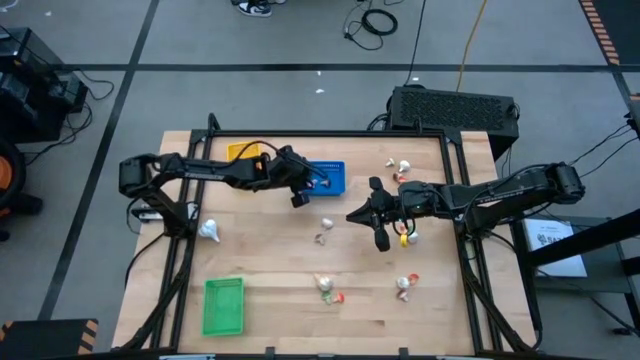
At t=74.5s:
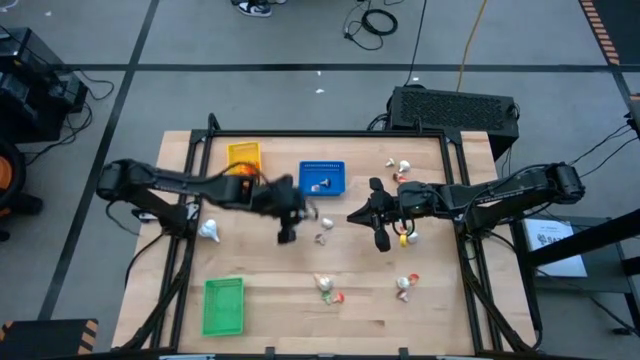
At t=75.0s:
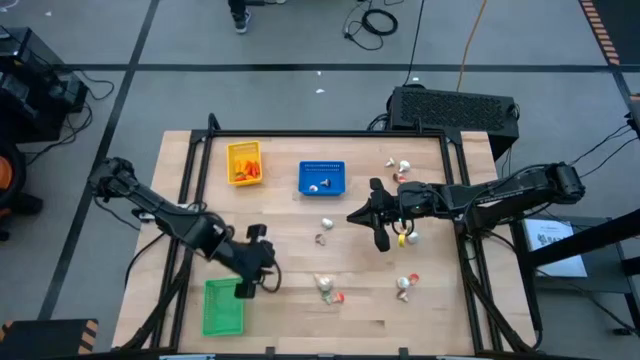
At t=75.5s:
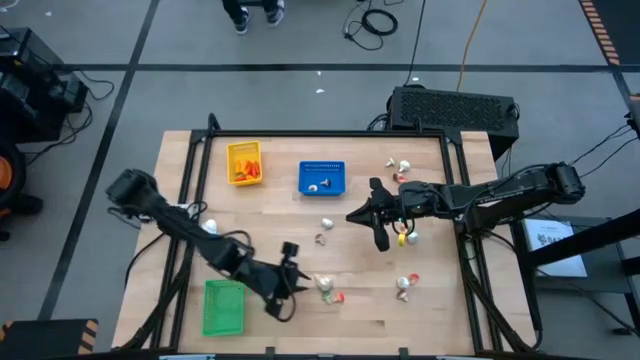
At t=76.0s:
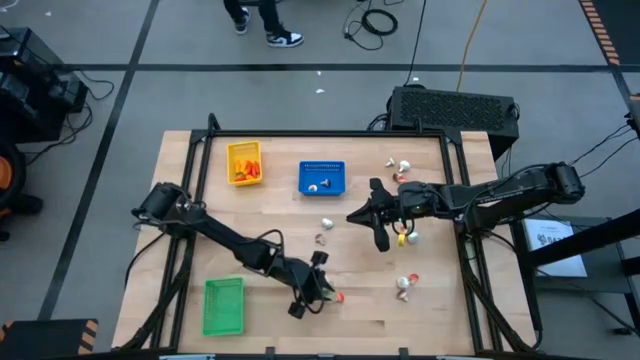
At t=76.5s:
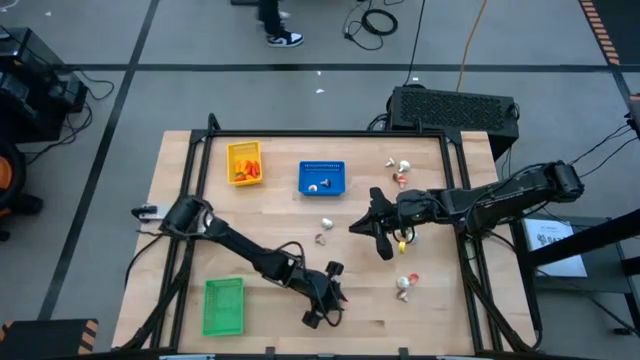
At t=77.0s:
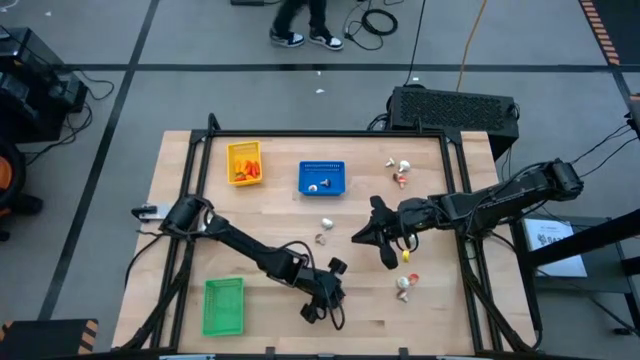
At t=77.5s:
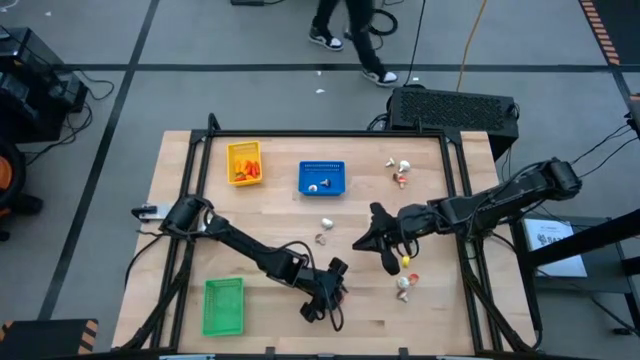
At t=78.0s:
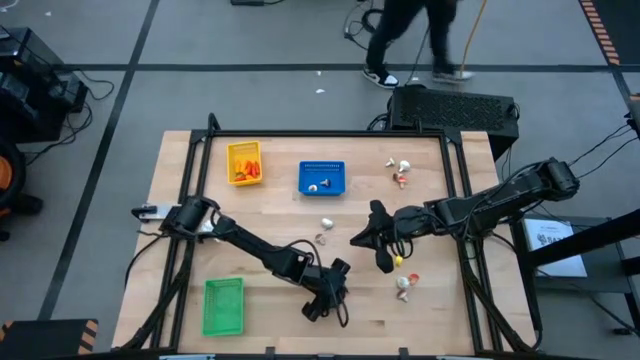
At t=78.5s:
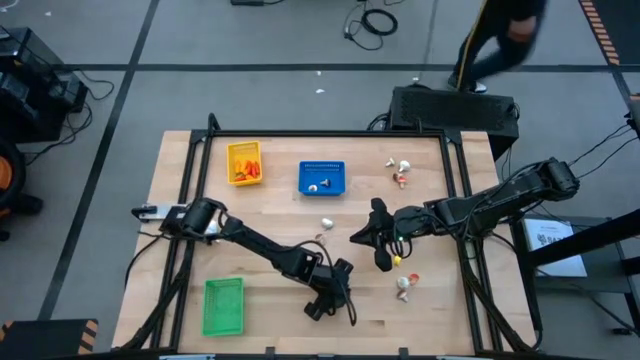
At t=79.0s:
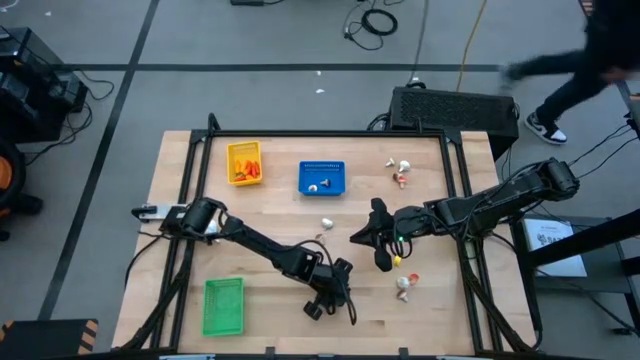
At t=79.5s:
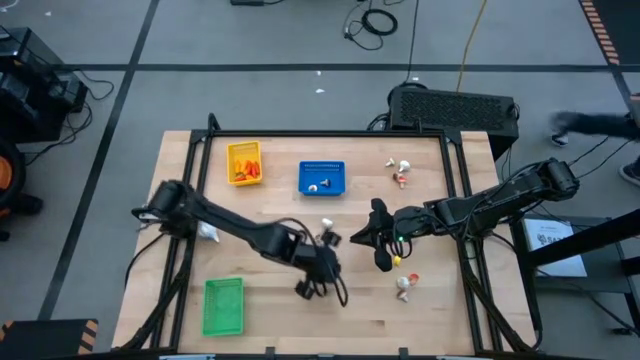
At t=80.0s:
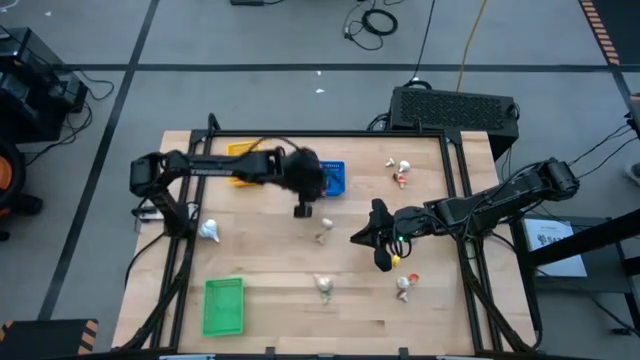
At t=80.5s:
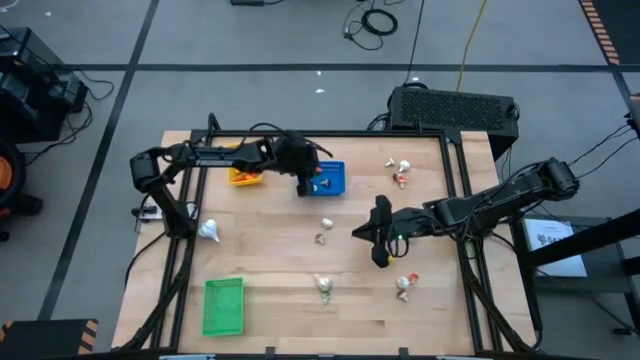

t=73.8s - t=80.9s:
Task: Sort produce into baskets
Put the orange mushroom into the blue bin

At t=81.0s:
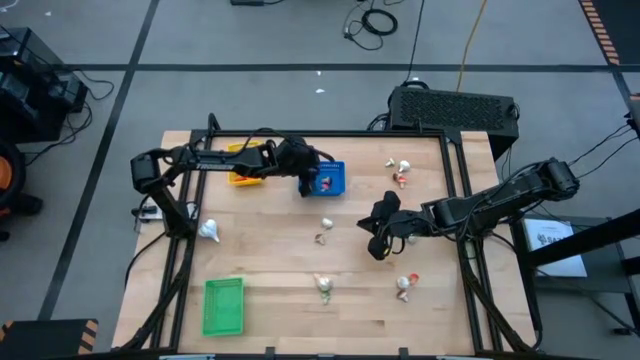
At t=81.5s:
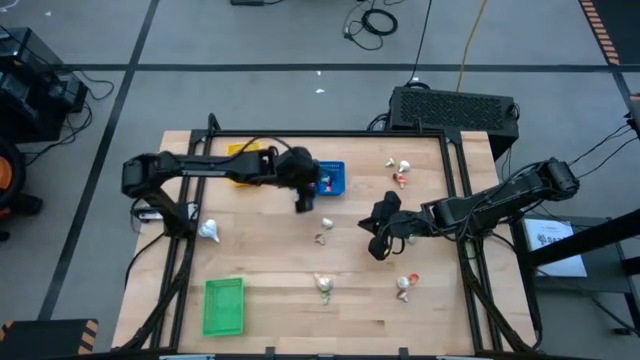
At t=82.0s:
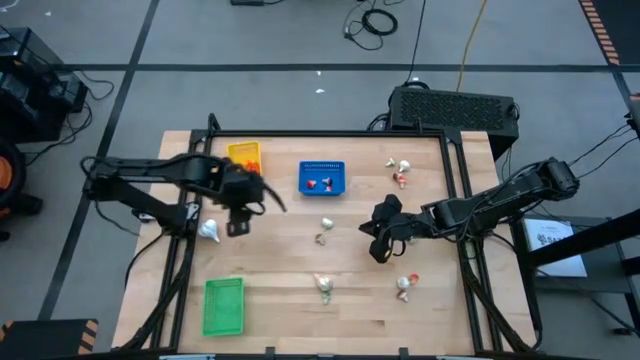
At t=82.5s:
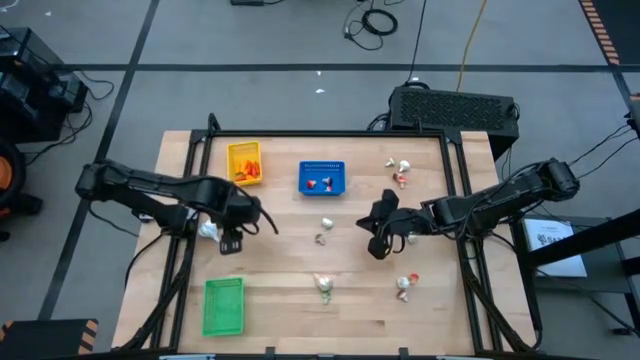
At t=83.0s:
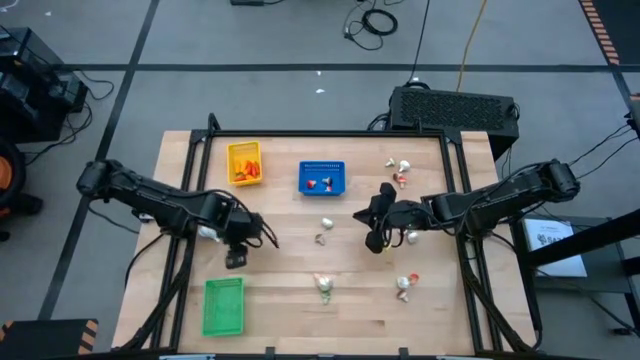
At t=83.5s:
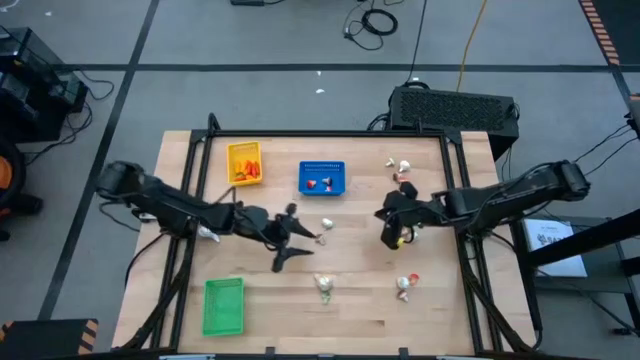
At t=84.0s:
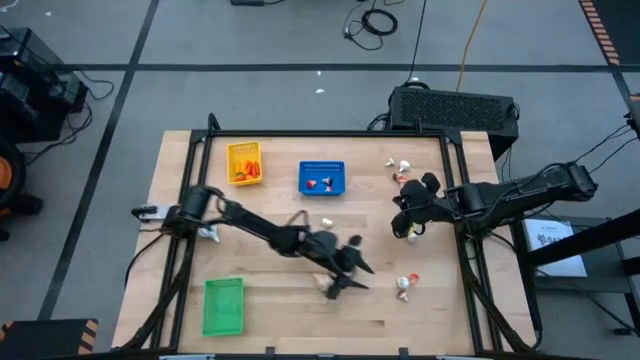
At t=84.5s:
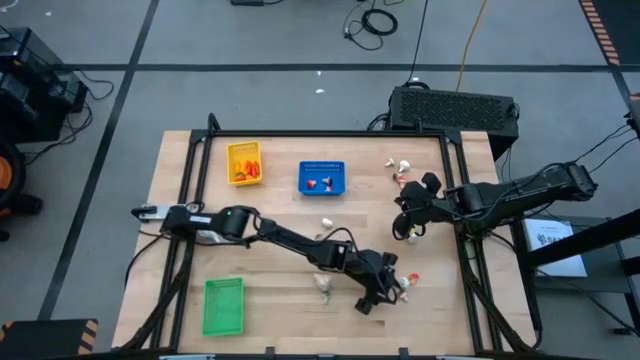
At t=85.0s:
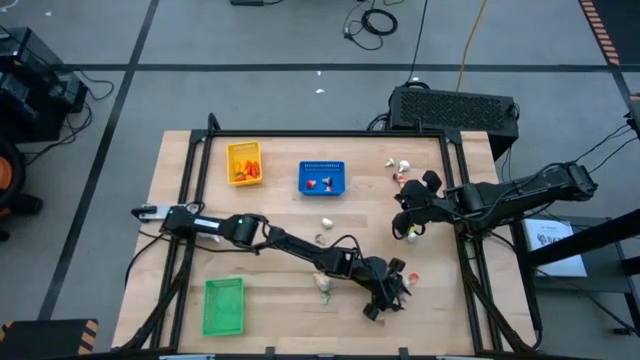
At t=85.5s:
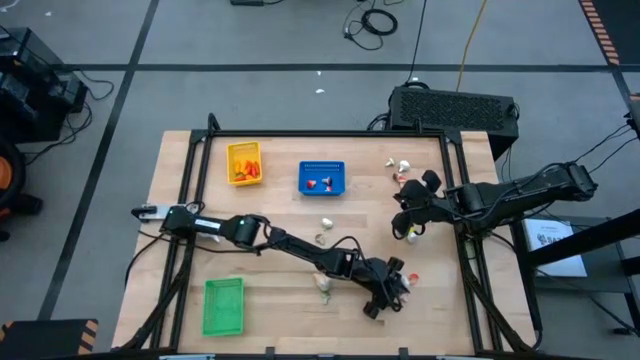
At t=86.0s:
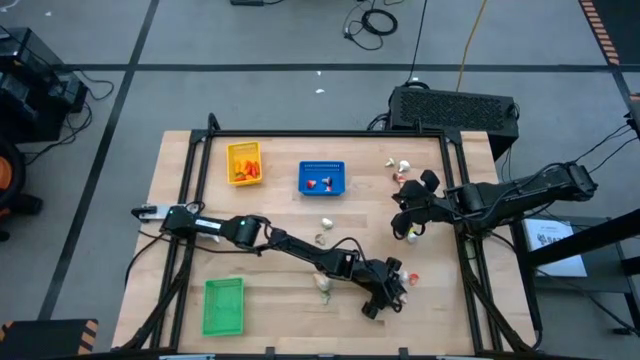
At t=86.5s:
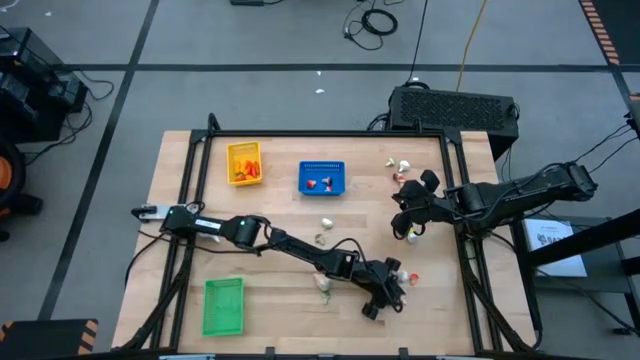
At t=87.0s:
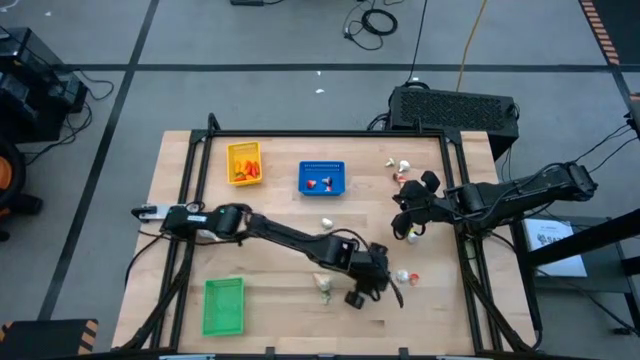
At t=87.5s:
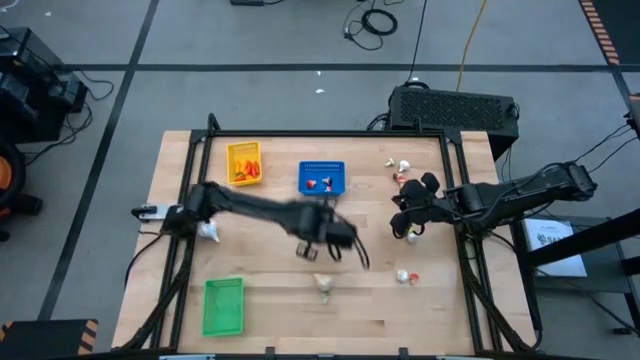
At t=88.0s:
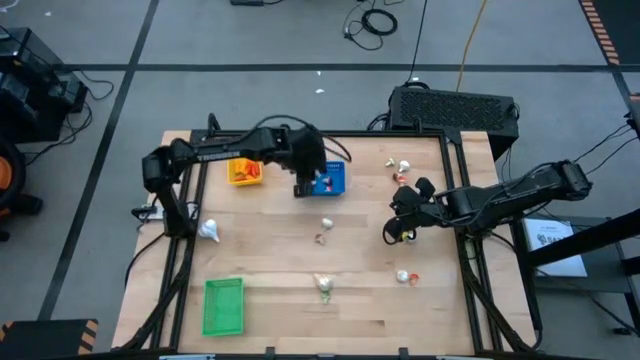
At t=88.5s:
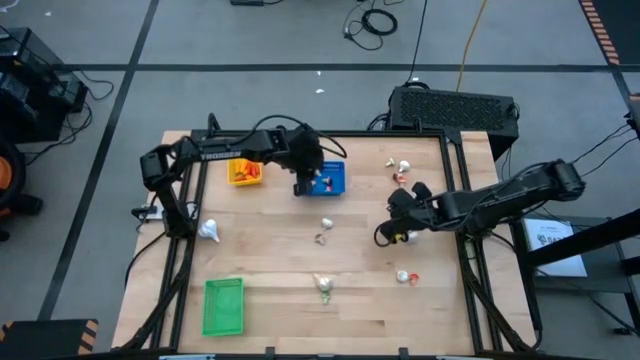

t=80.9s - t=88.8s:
Put the orange mushroom into the blue bin

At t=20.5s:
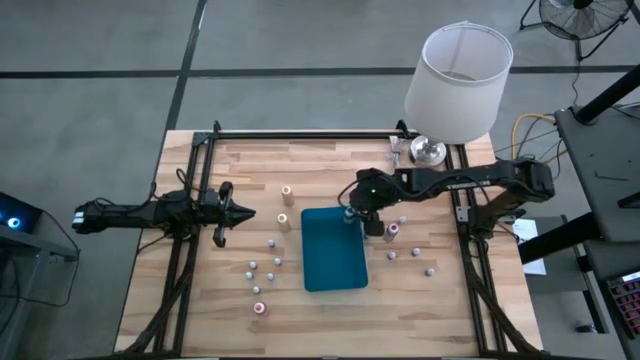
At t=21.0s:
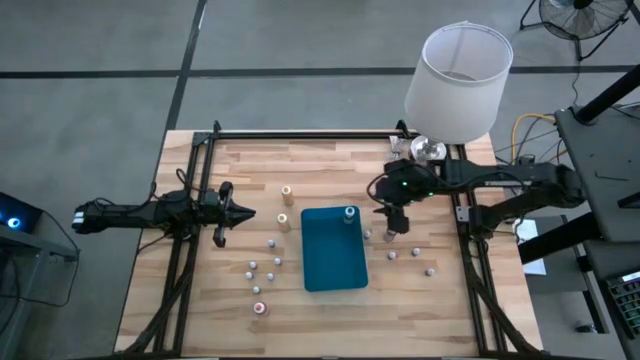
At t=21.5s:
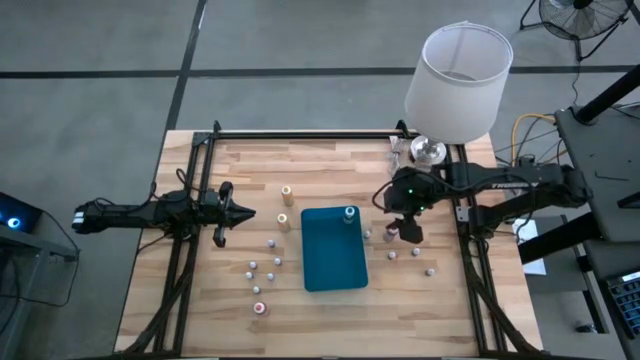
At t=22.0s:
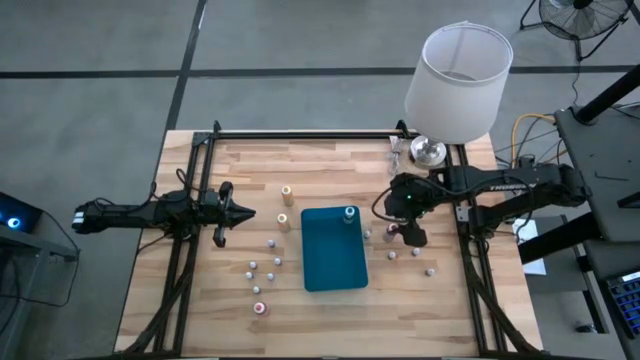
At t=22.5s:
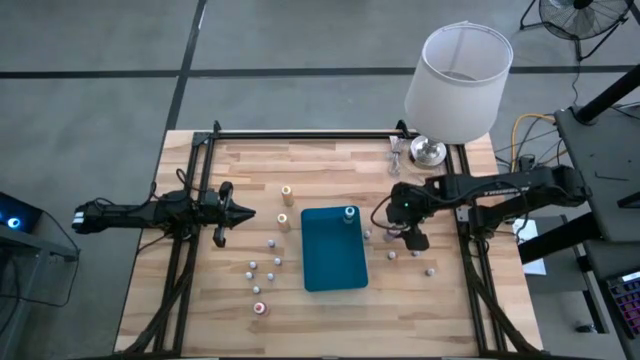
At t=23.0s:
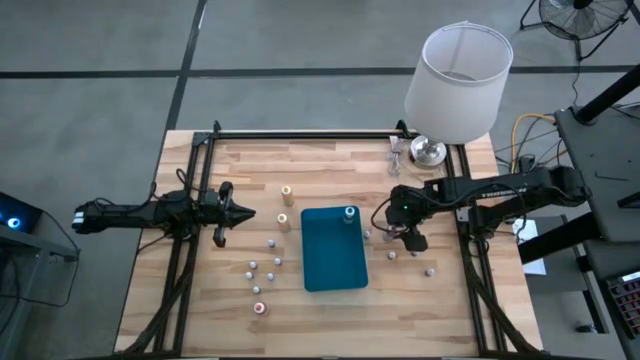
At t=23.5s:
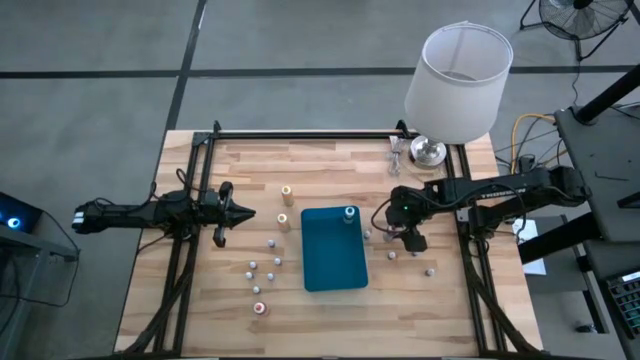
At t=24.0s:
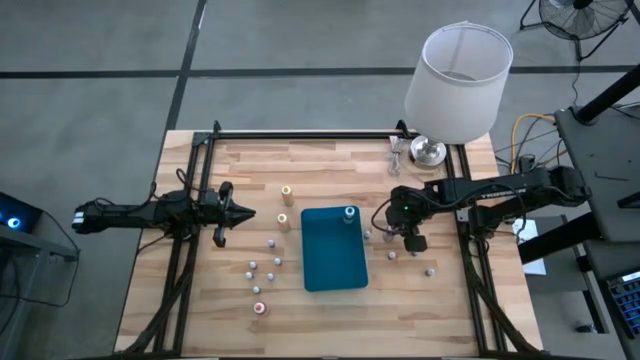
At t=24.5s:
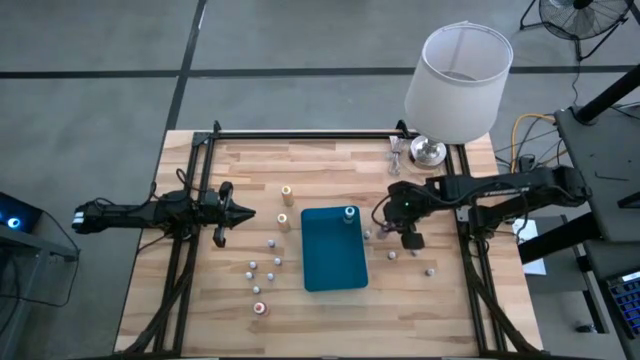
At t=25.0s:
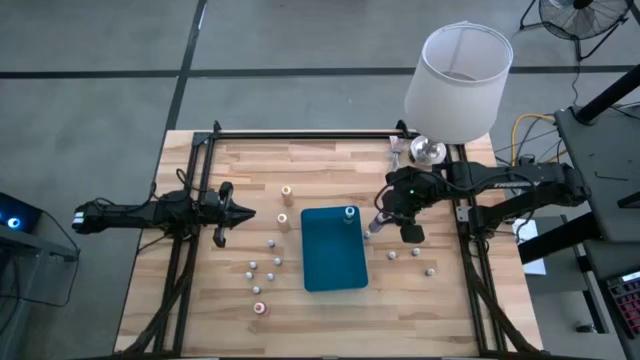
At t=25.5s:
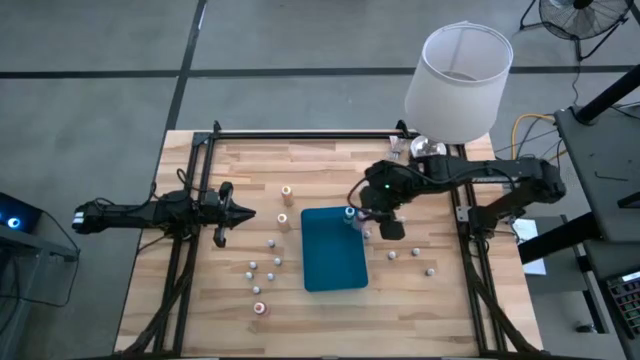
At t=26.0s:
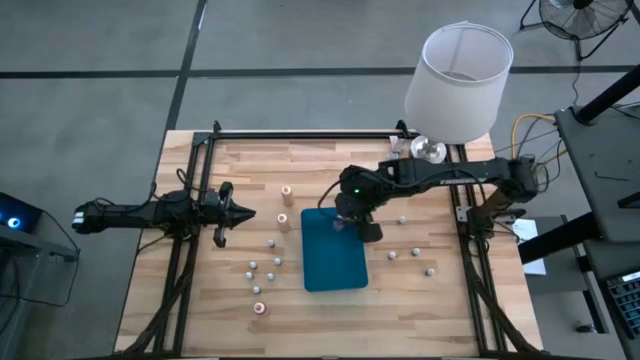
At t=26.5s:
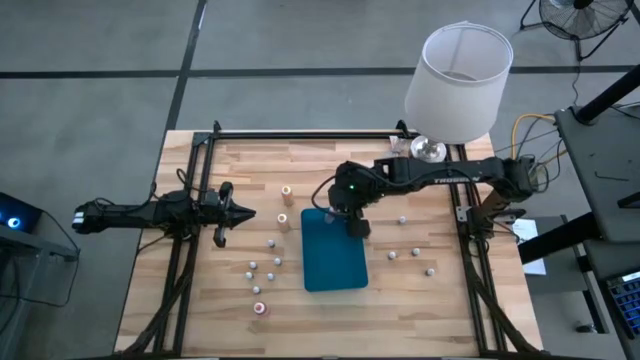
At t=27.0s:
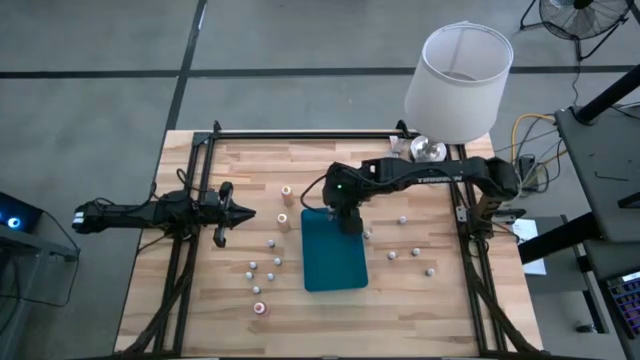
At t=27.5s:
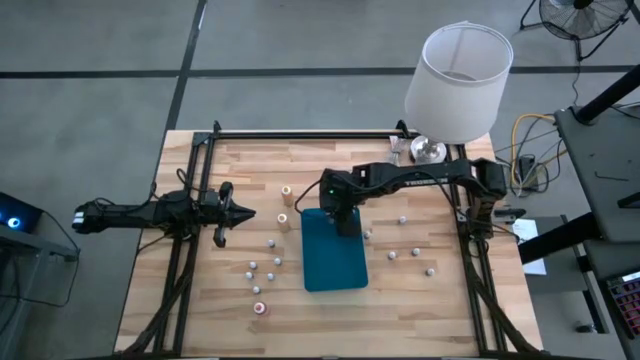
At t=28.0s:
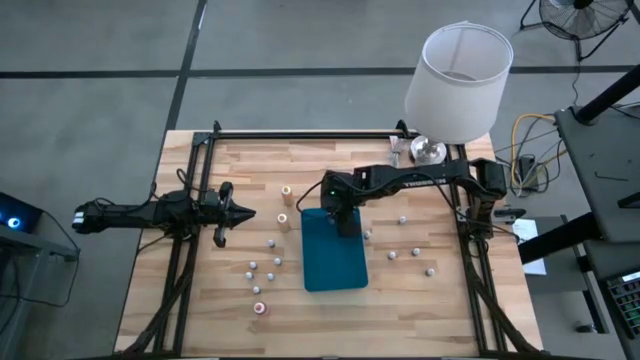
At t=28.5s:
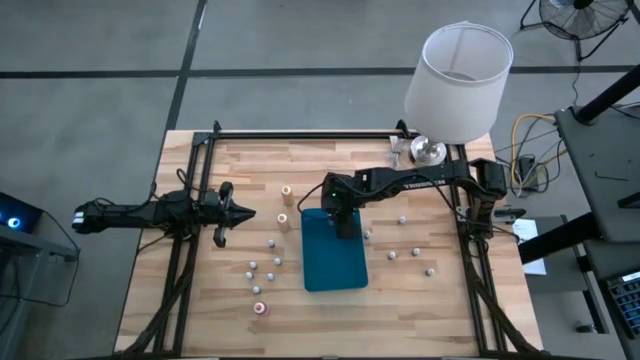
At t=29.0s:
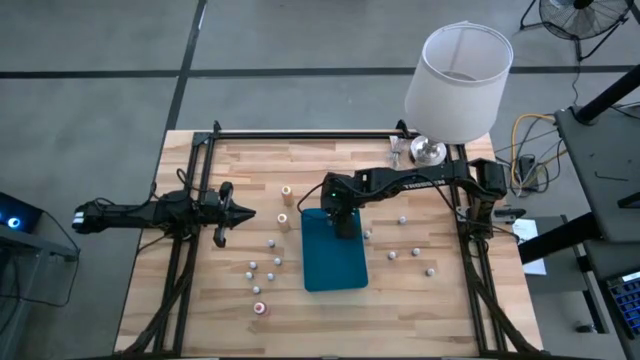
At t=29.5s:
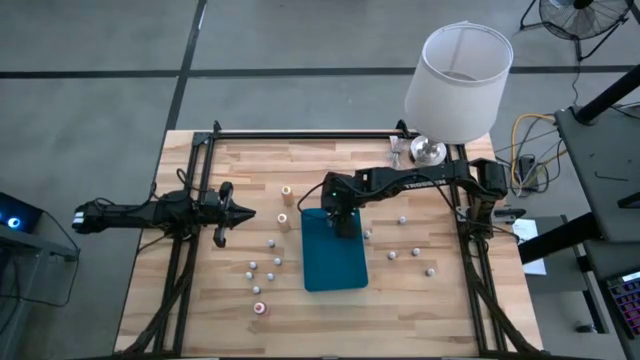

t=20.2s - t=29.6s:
Task: Pick & Place food coloring
Put the large red food coloring bottle into the blue bin
